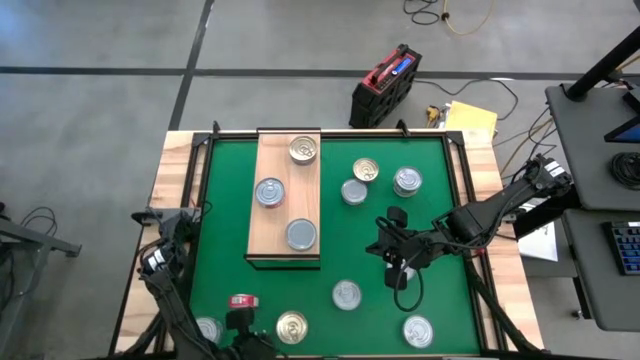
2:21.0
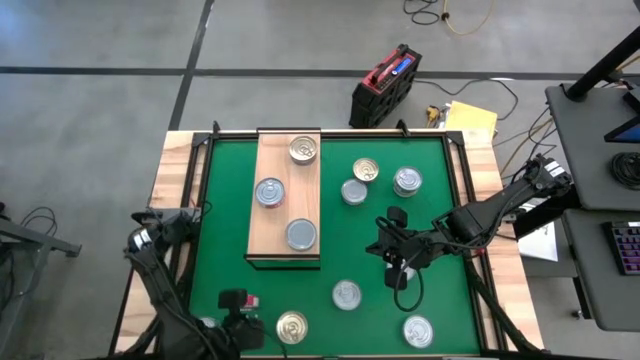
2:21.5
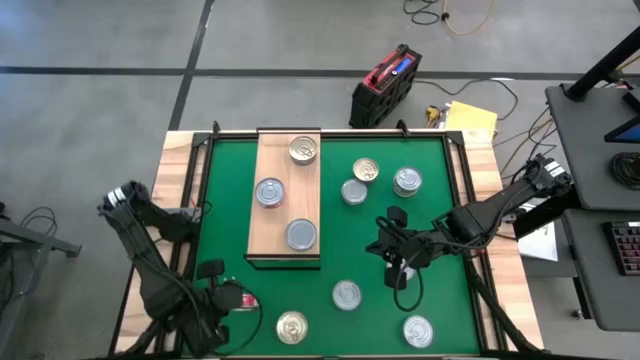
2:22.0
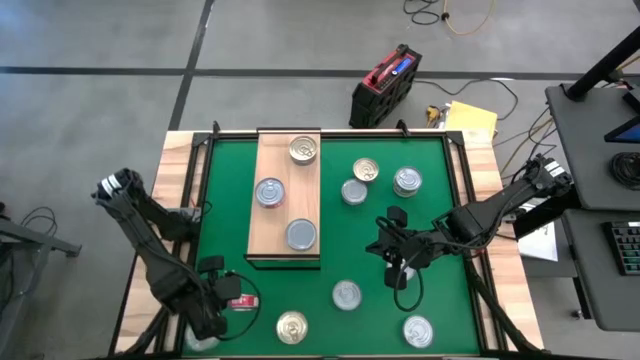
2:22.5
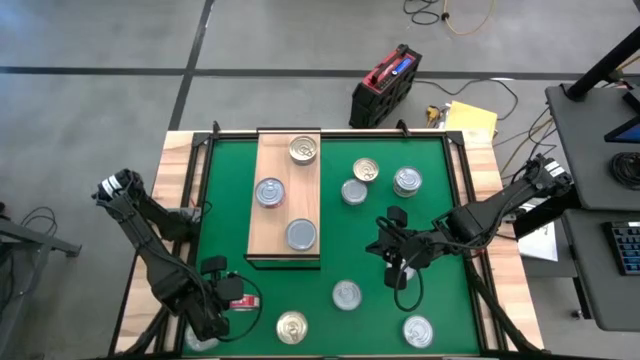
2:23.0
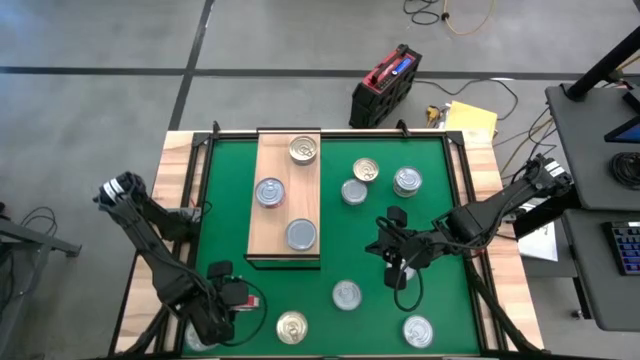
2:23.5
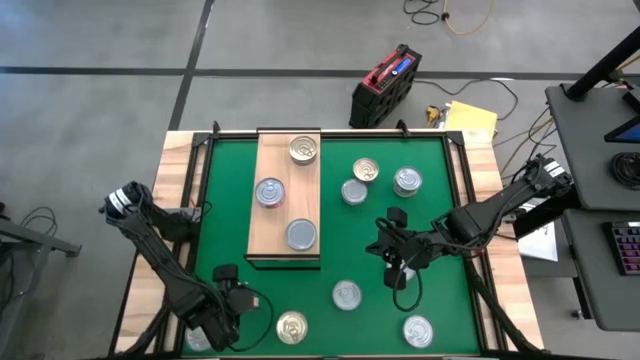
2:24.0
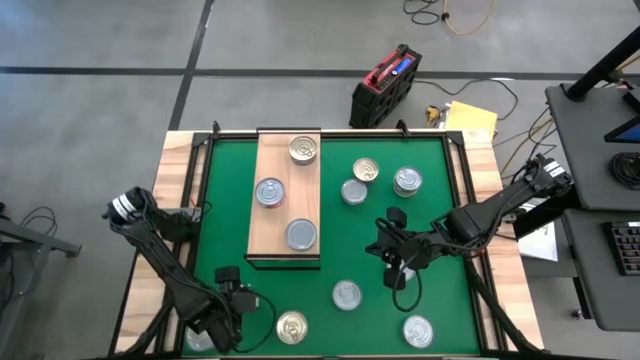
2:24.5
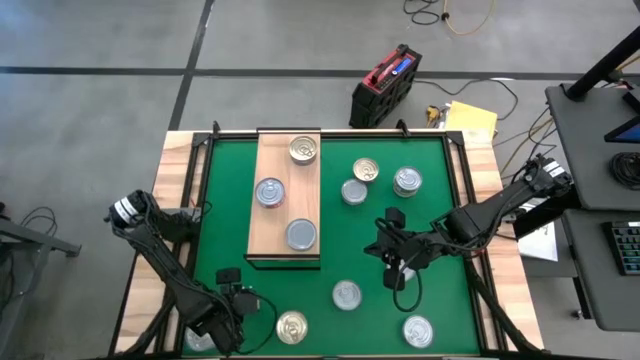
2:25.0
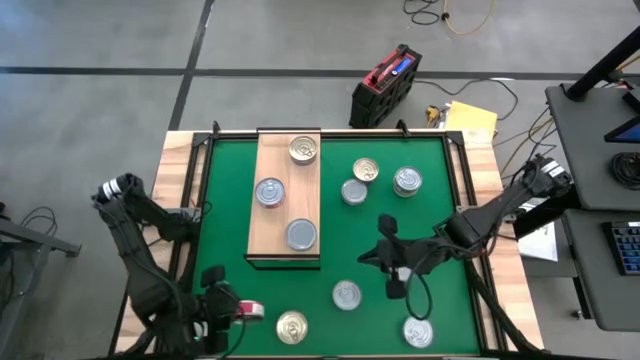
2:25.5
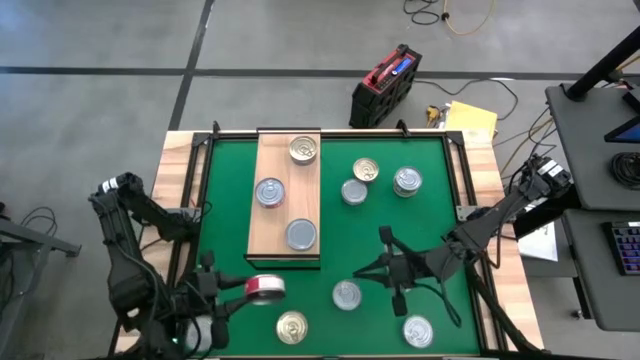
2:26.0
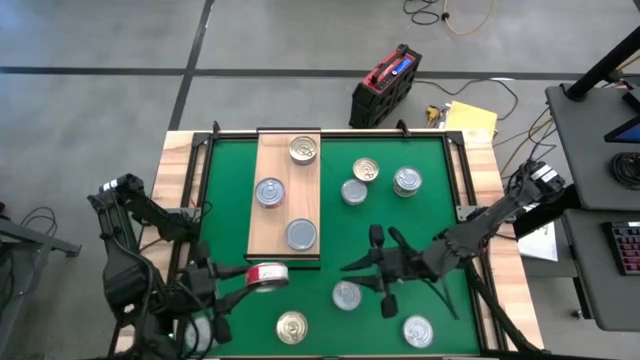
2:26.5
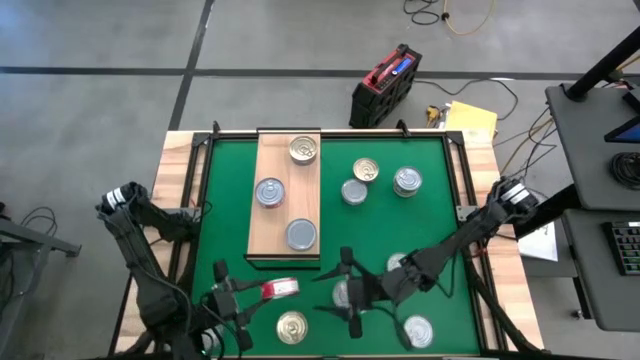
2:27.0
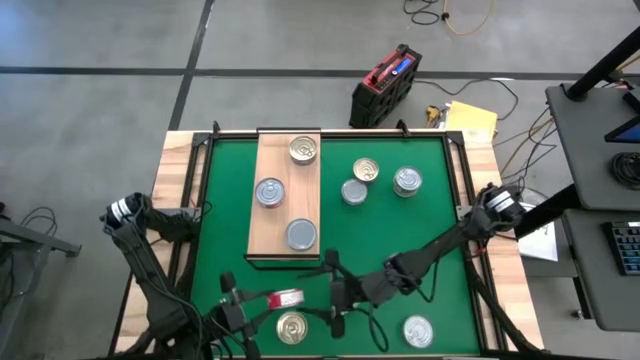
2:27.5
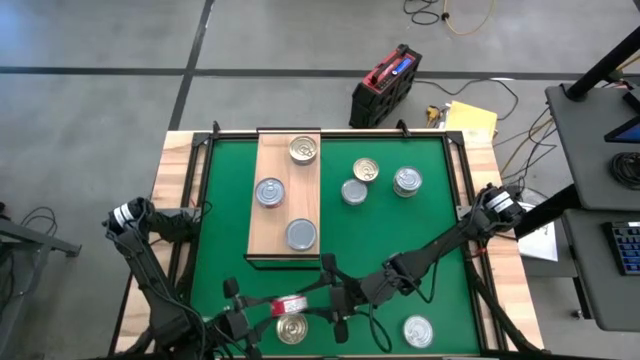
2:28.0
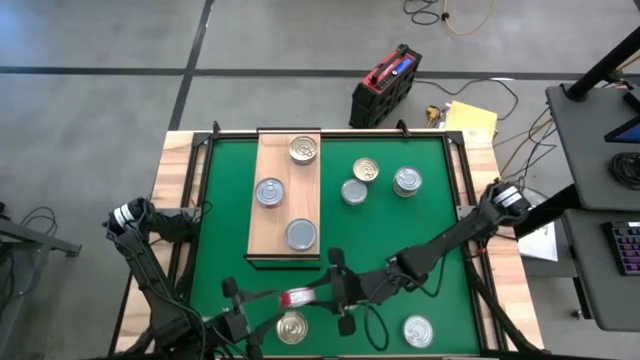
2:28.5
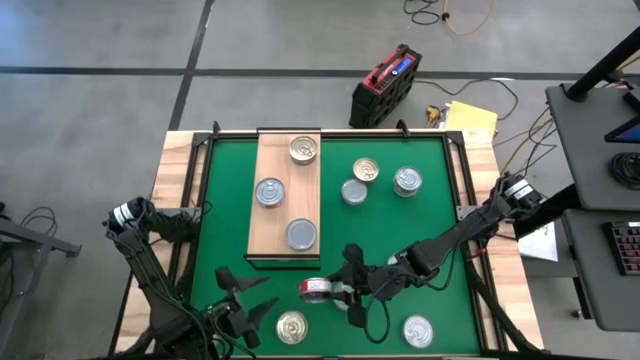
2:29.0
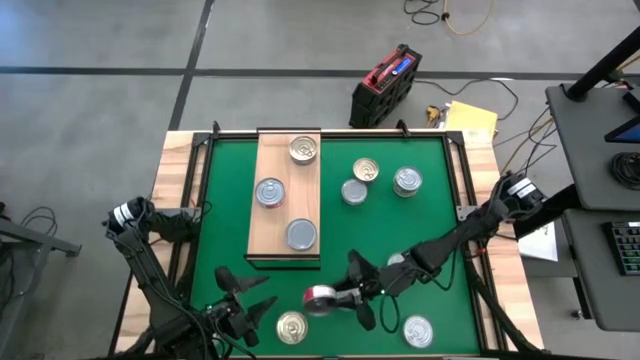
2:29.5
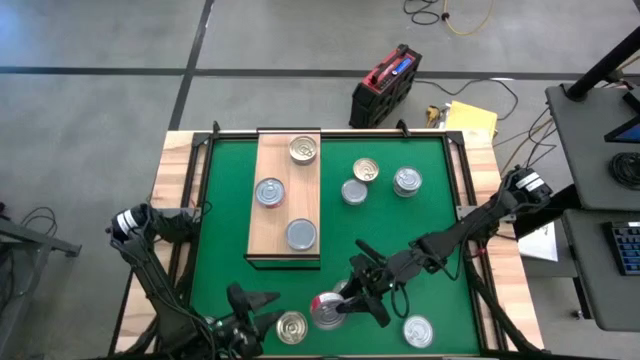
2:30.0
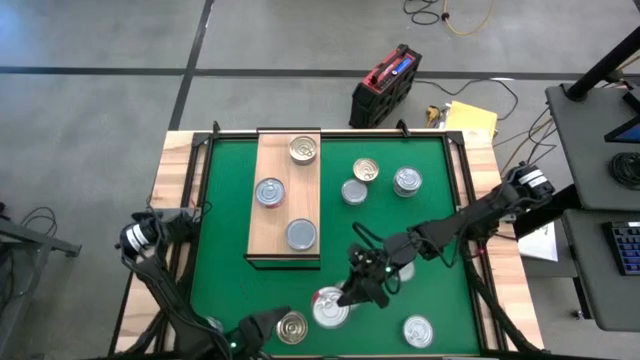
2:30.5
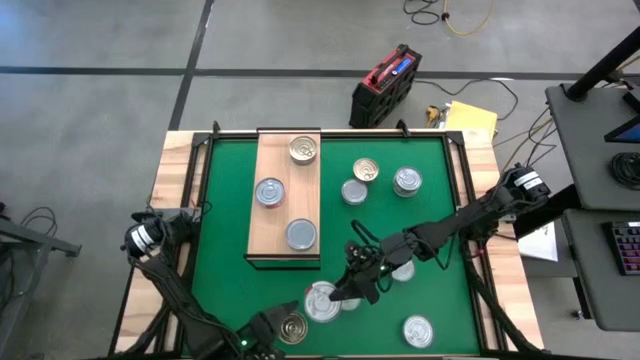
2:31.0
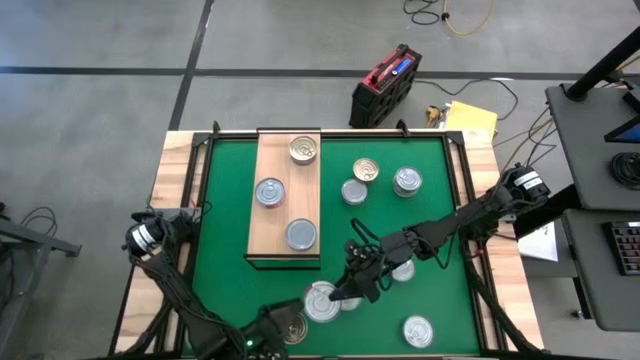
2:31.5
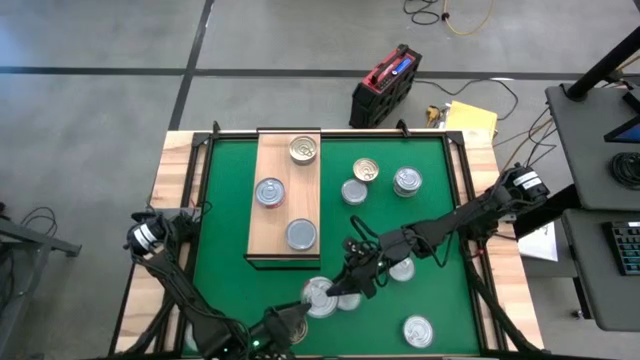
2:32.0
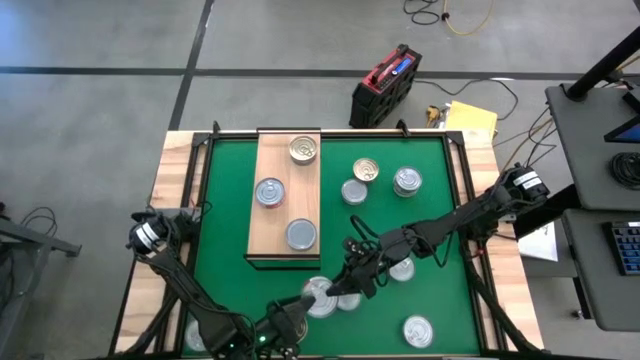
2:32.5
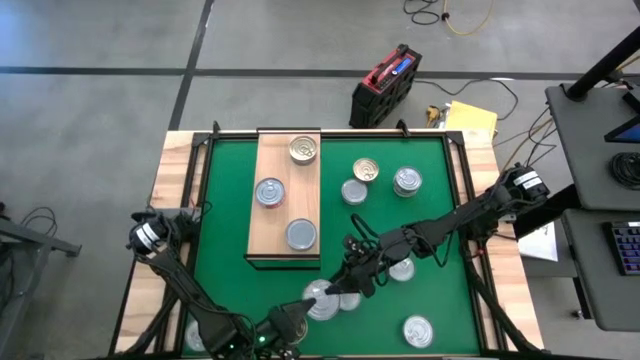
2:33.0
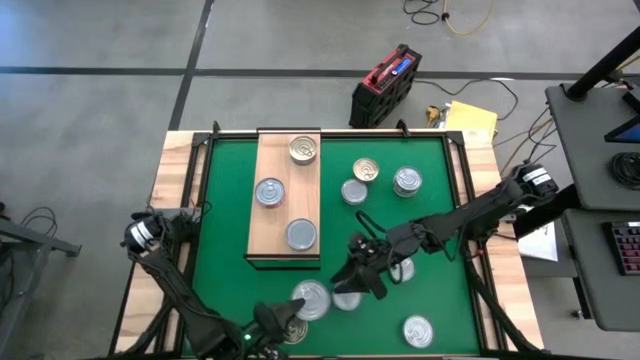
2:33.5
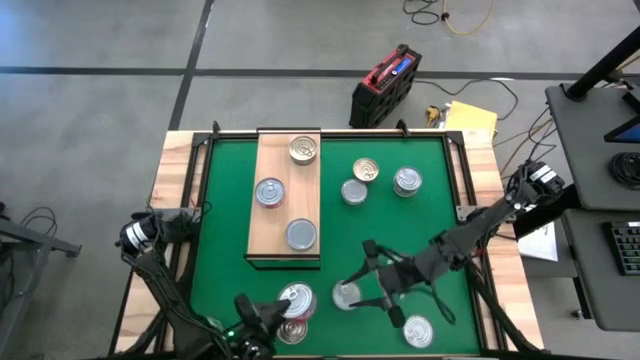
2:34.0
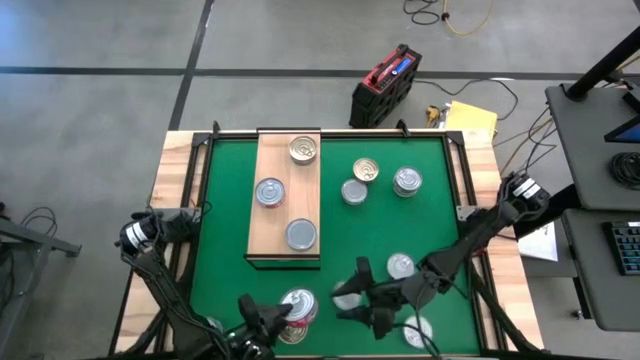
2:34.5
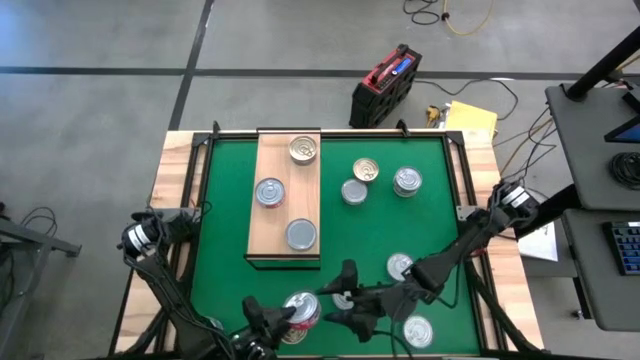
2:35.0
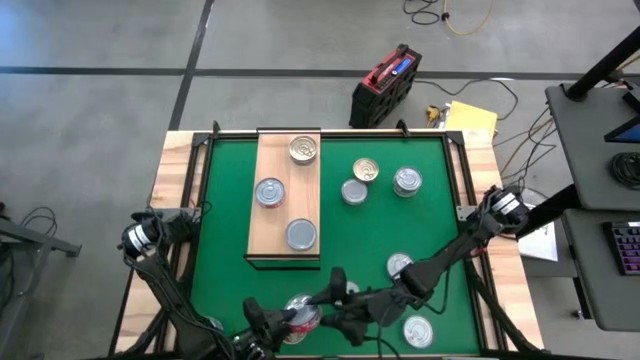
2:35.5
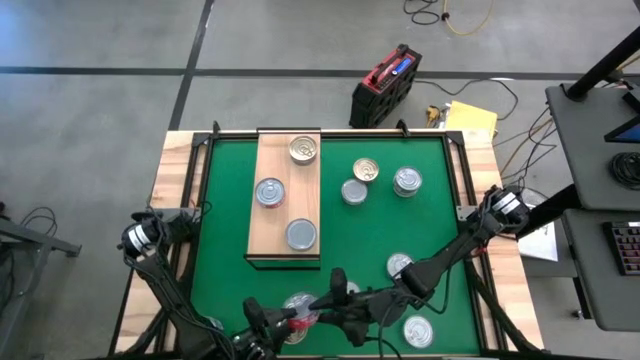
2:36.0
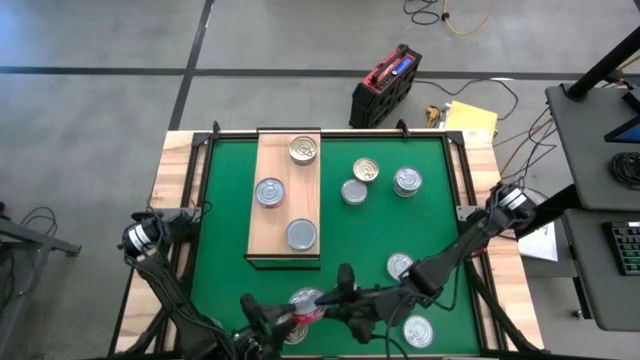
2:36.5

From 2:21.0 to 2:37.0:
Task: Stack canned seafood by type on shelf
Stack the red tuna can on top of the red tuna can on the shelf

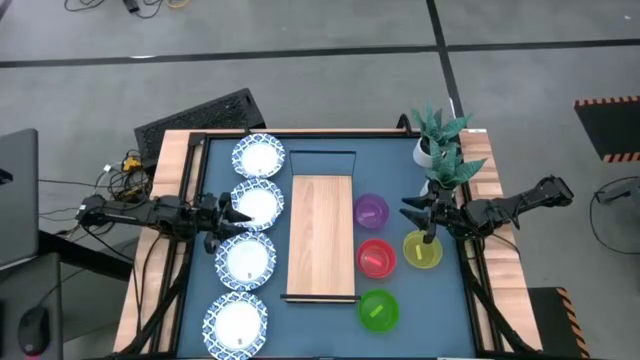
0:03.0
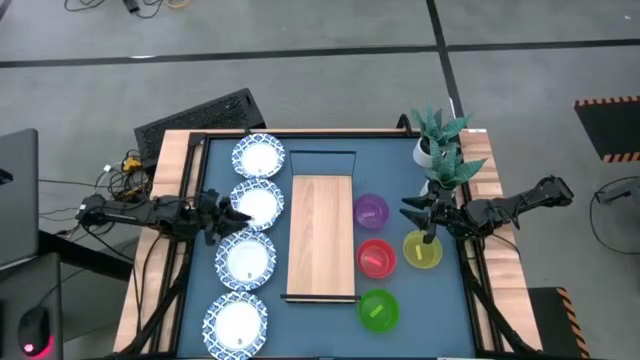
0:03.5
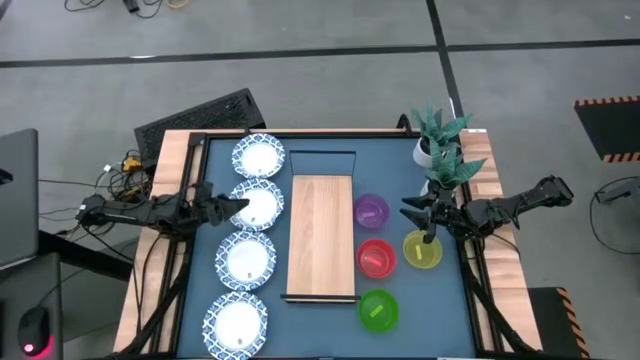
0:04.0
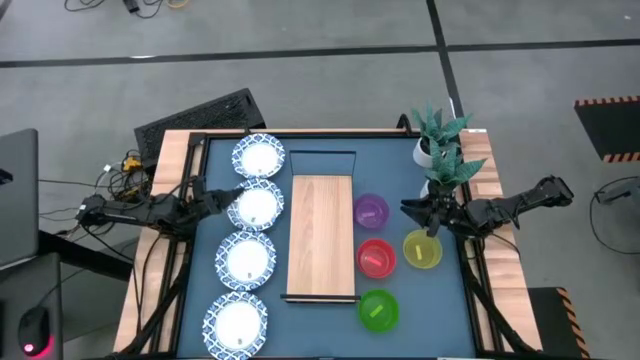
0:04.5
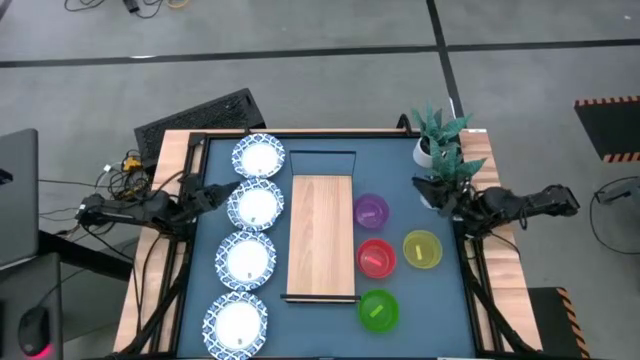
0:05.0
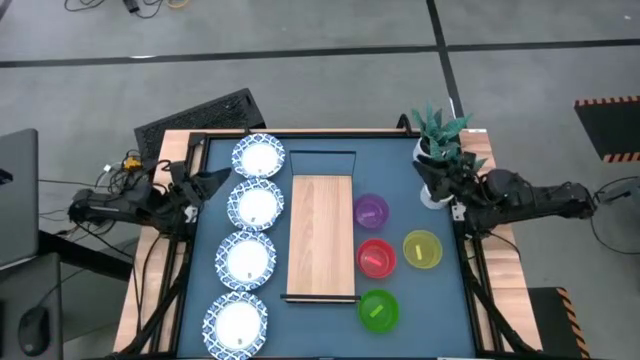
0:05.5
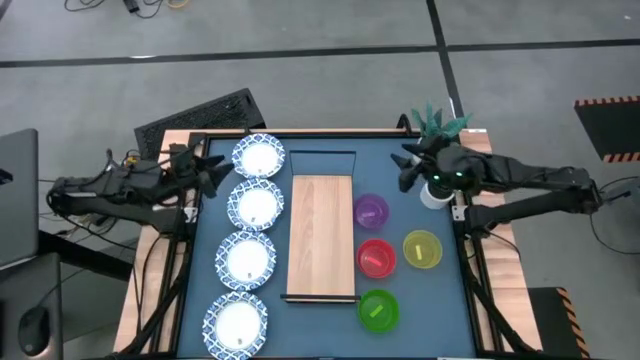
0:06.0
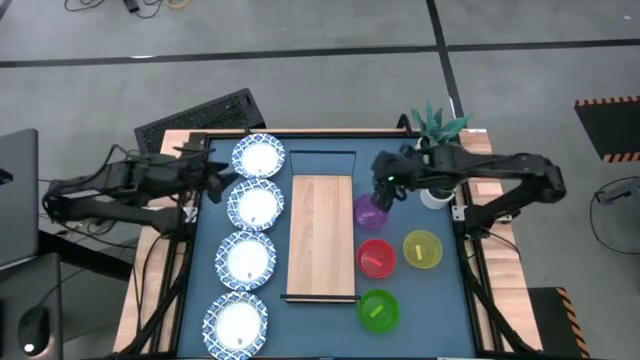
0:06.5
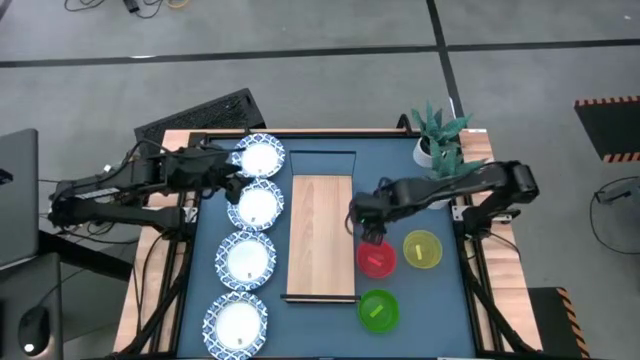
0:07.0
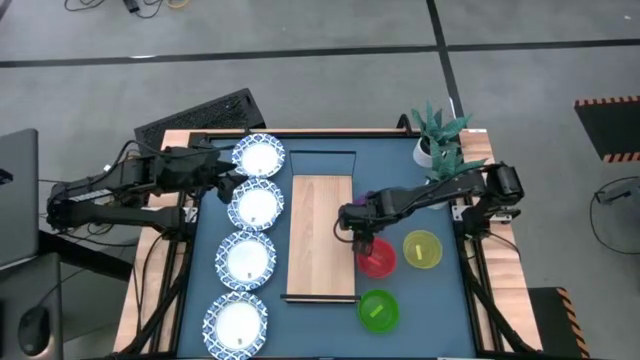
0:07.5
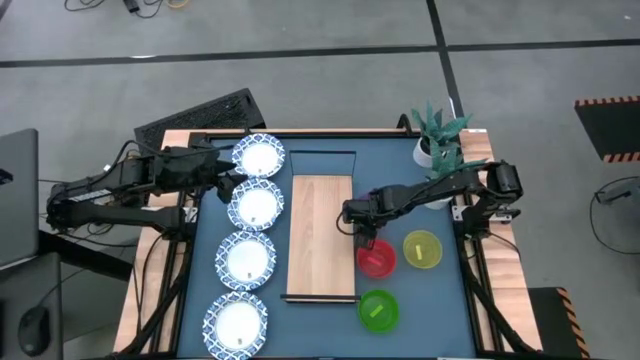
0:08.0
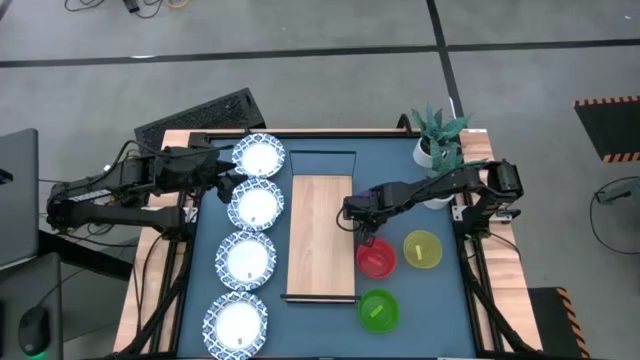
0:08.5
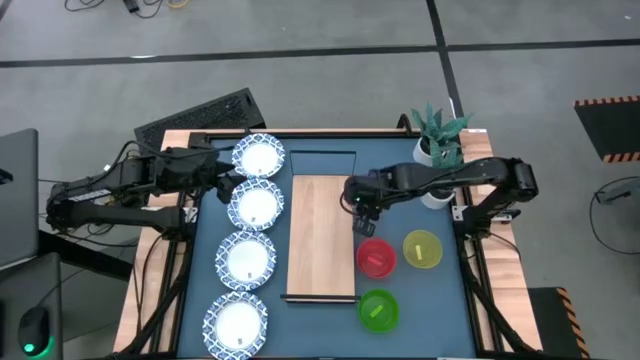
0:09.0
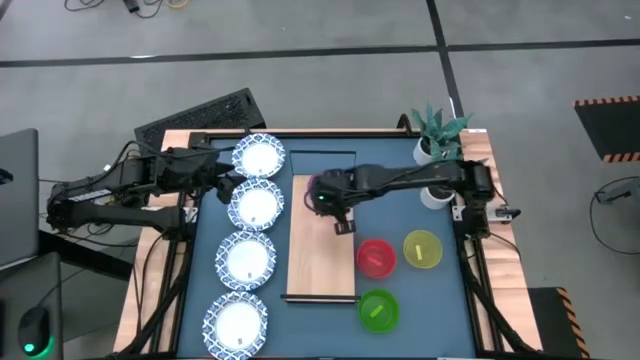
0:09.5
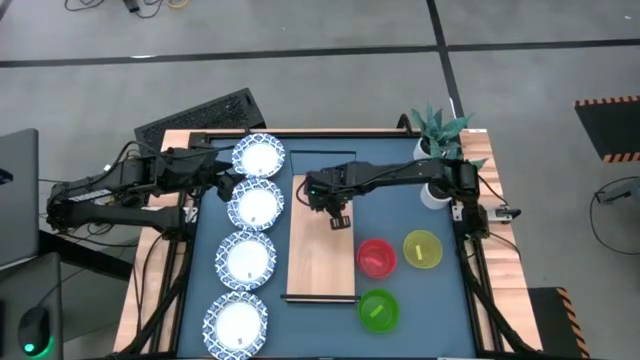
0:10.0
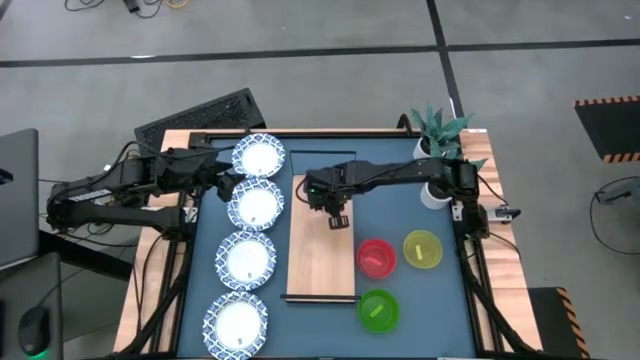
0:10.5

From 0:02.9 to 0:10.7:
Task: Place and stack bowls onto a shelf
Put the purple bowl on the shelf
